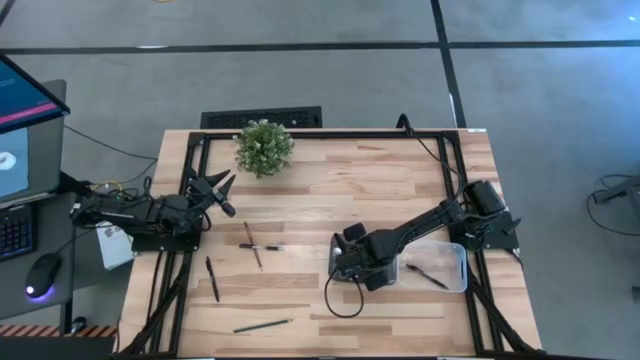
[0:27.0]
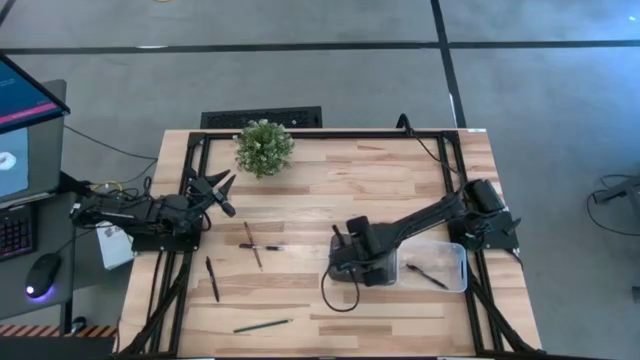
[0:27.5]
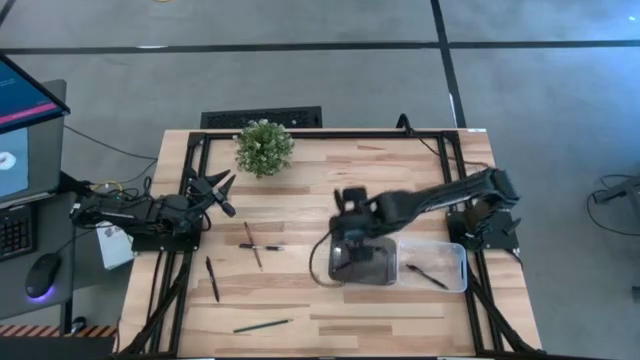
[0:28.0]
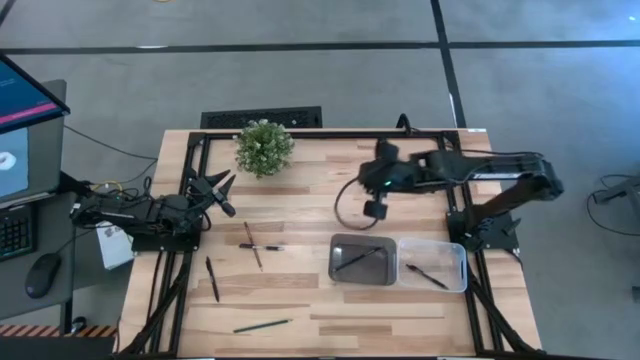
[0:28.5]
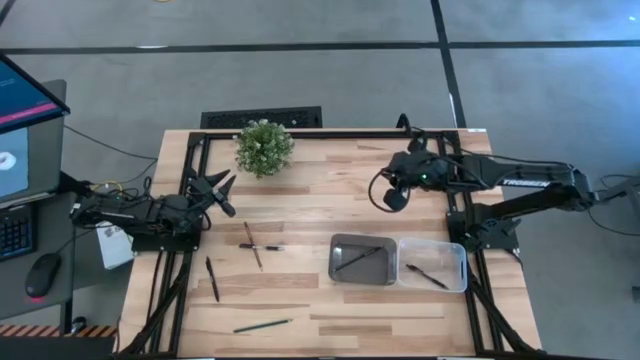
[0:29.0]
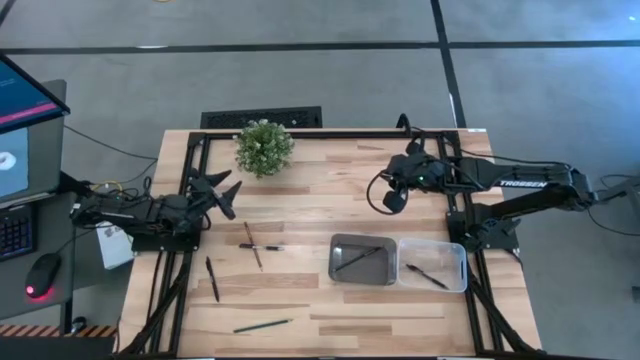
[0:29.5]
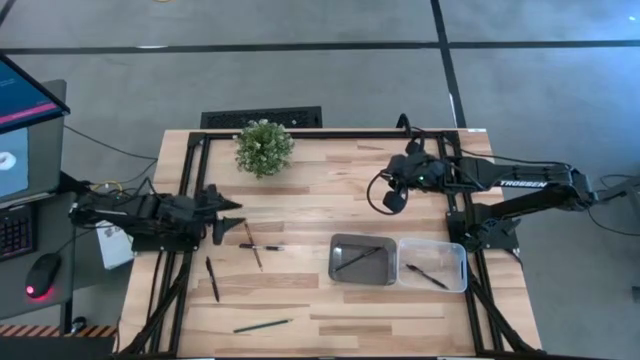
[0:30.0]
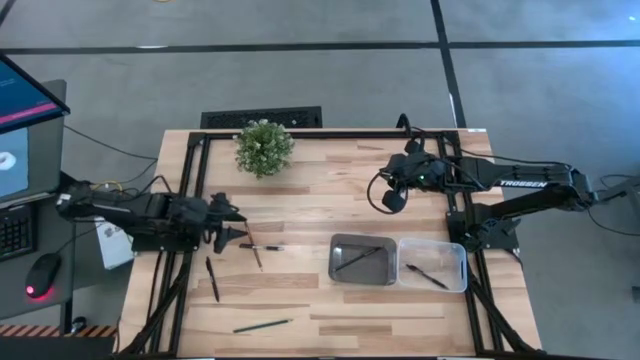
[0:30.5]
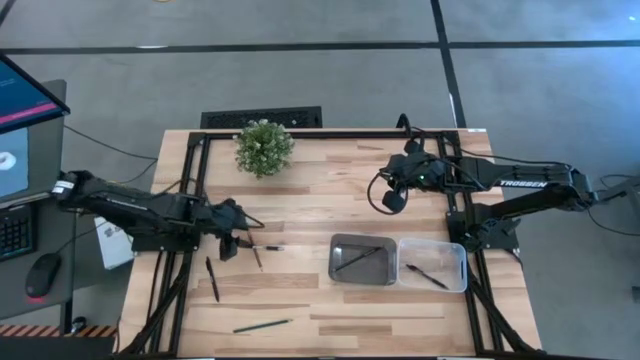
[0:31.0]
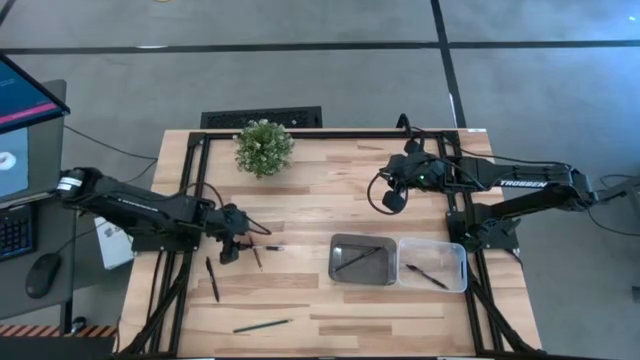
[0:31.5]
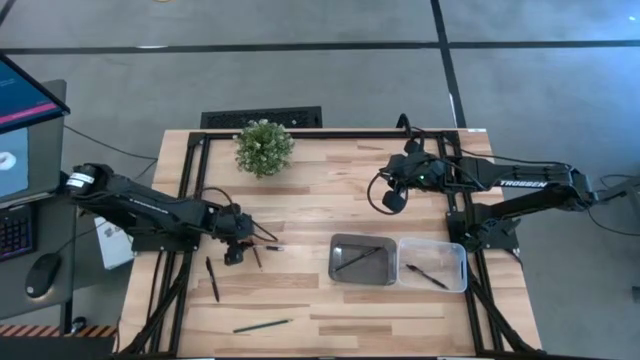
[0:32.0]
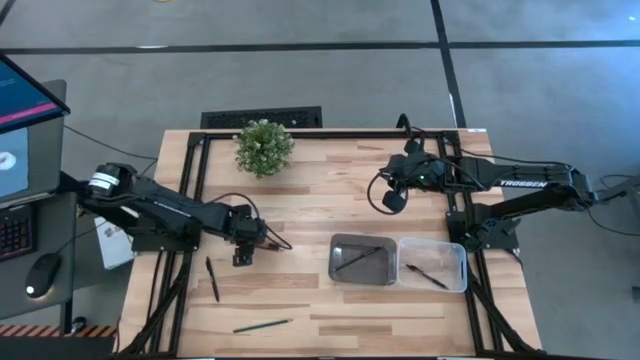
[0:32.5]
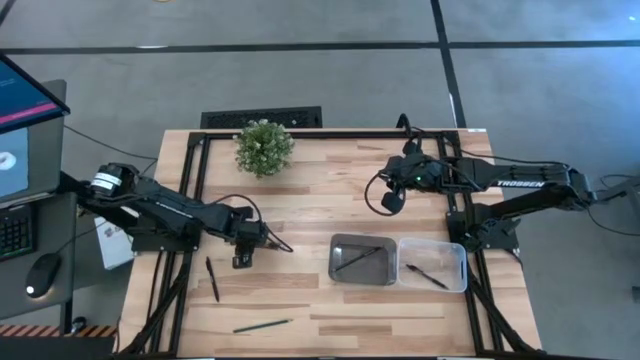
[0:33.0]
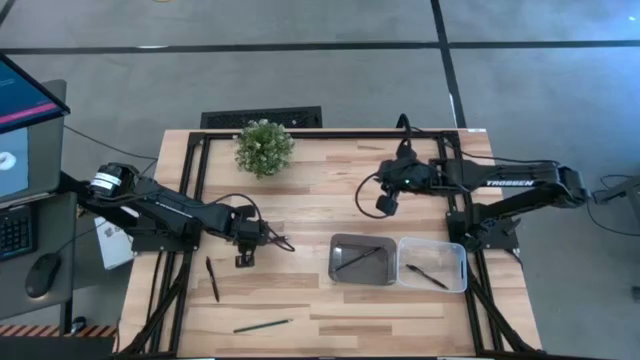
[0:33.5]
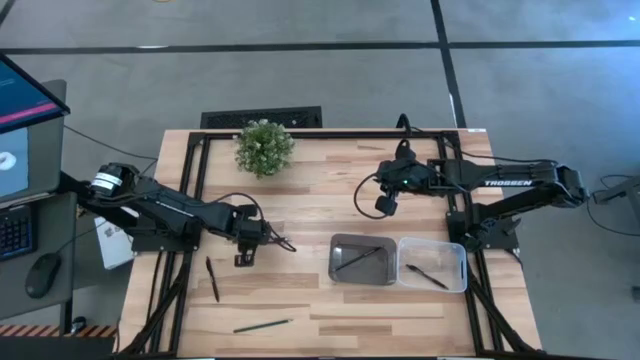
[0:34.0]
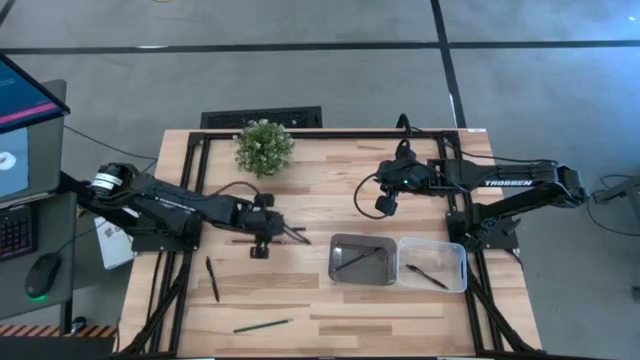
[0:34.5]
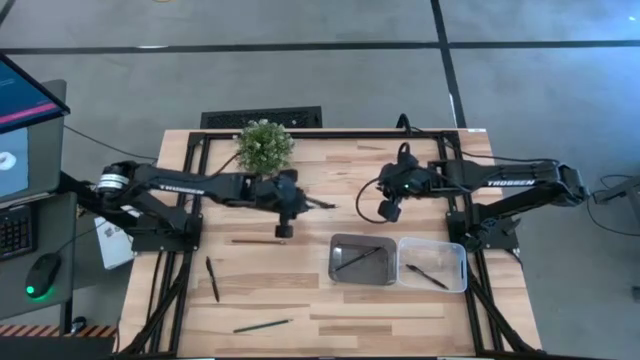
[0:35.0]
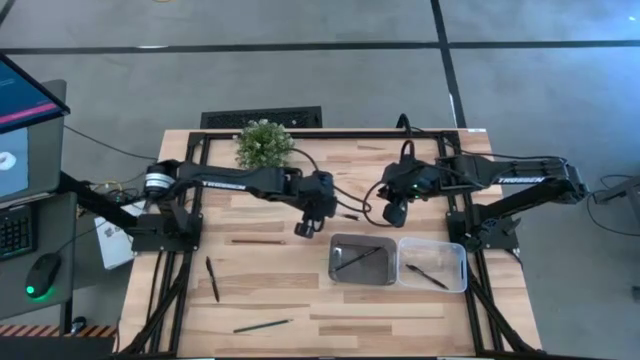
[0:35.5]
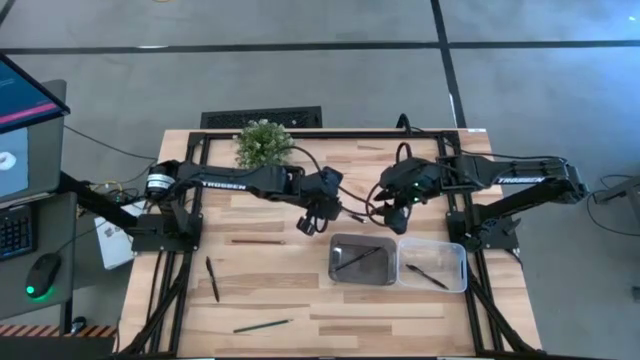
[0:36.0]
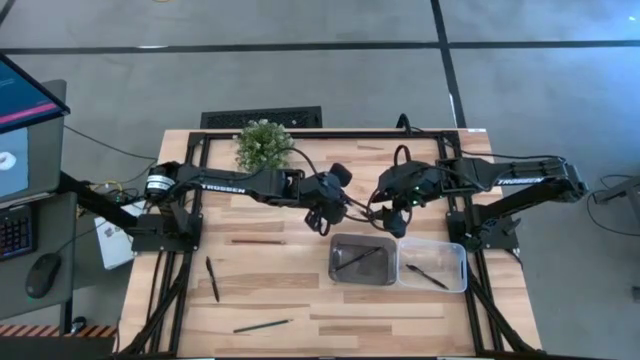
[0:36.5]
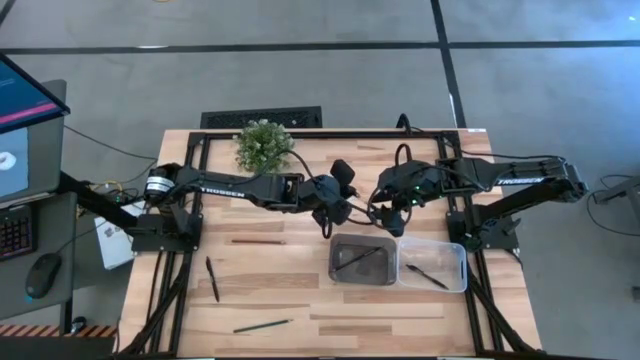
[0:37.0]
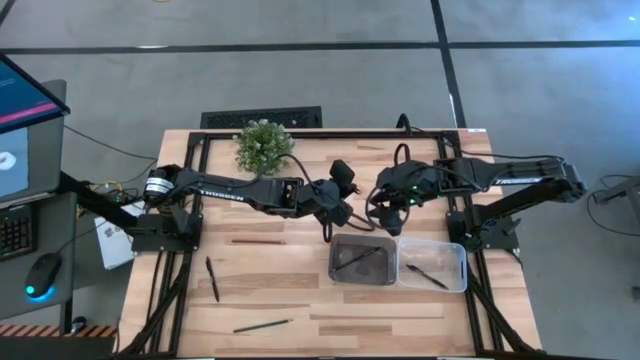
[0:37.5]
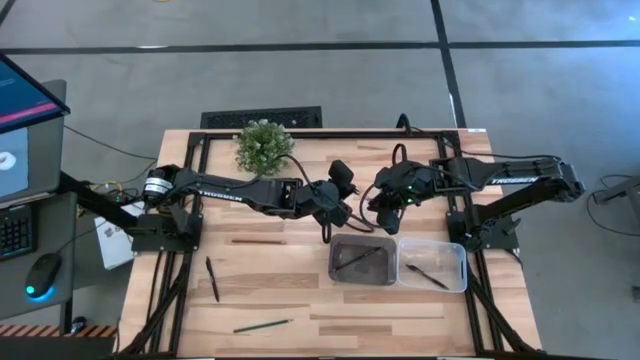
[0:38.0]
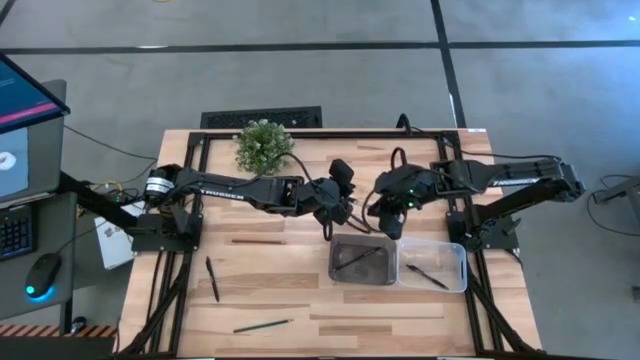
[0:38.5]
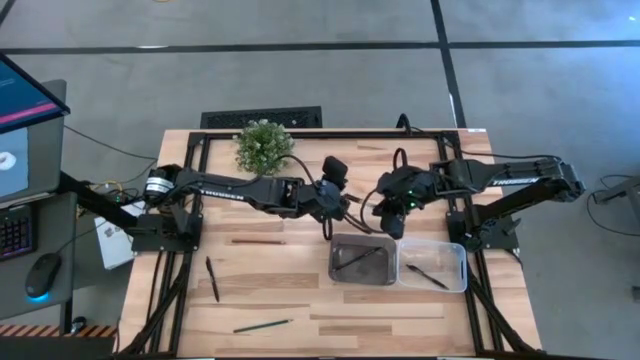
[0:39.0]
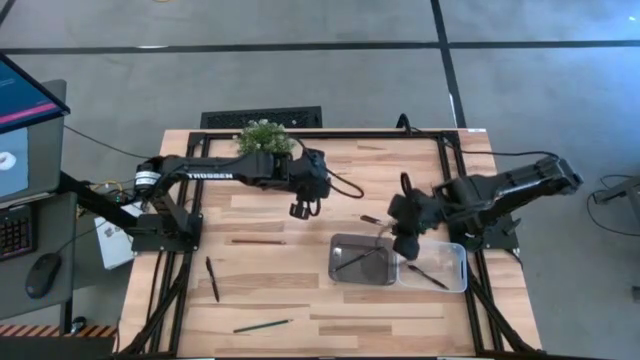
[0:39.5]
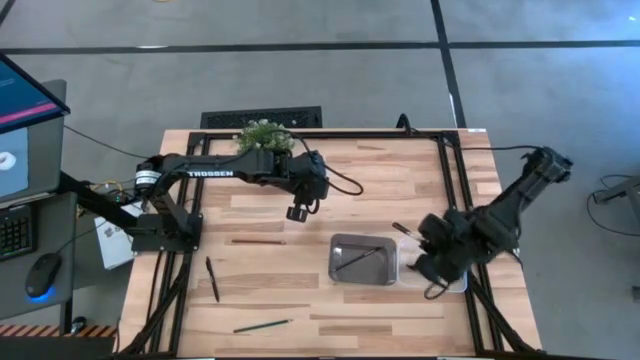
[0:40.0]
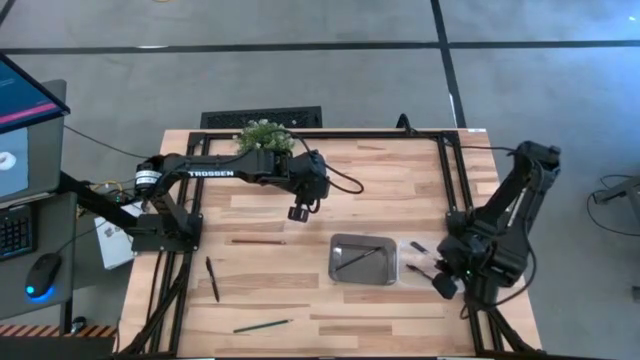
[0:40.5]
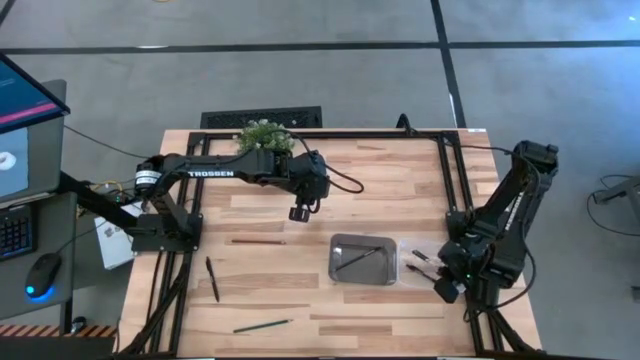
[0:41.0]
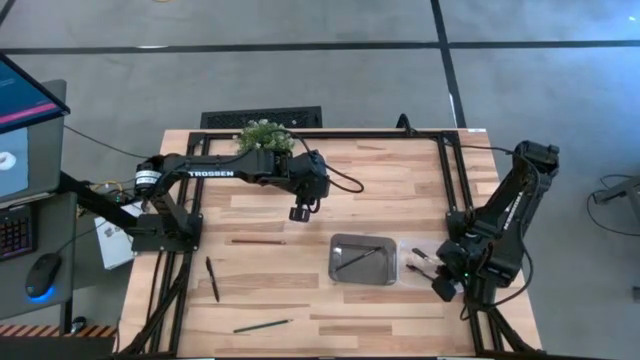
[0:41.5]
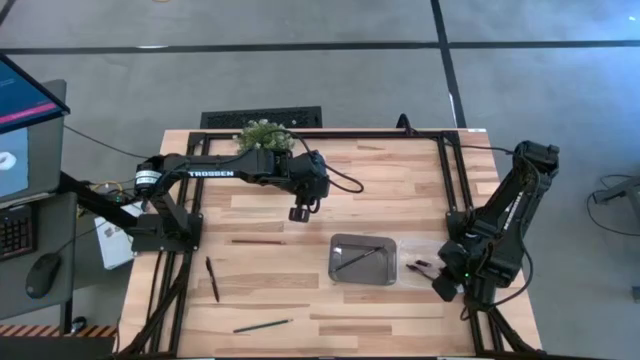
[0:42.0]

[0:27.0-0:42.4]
Task: Sort pens & pencils
Put the top black pen into the transparent bin

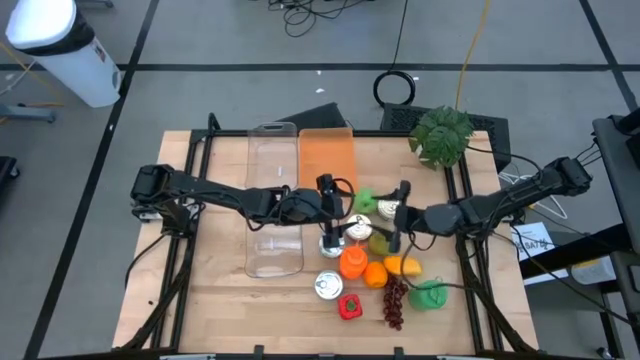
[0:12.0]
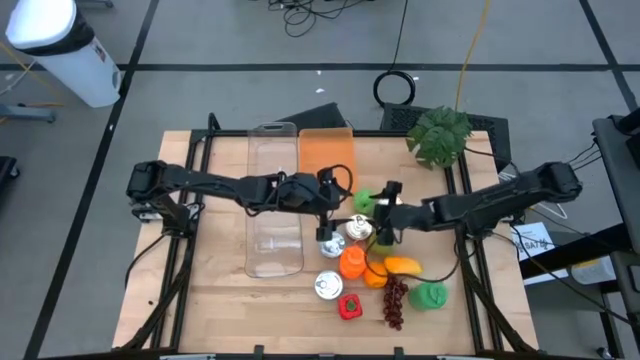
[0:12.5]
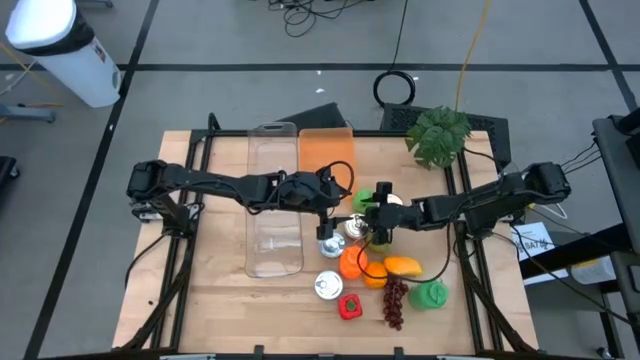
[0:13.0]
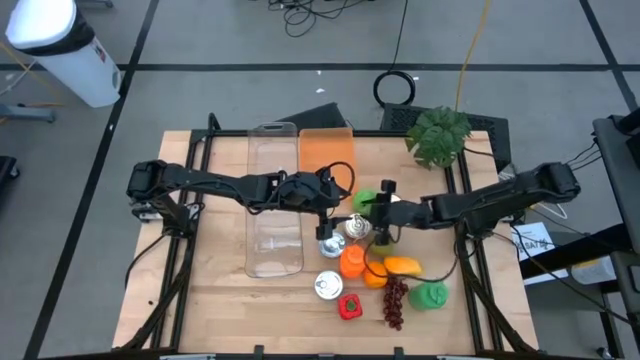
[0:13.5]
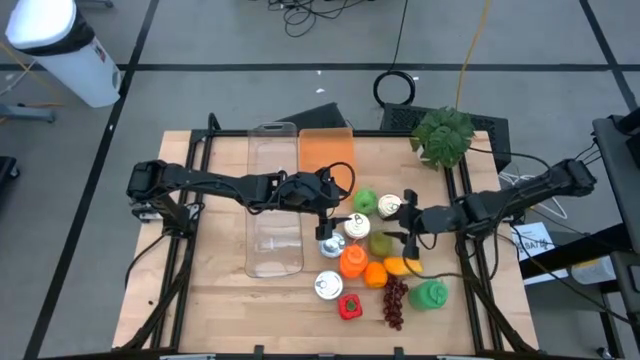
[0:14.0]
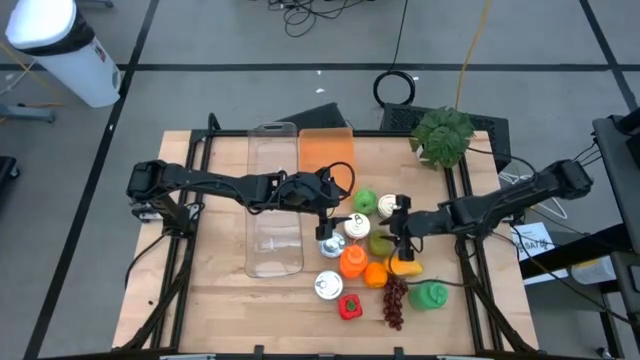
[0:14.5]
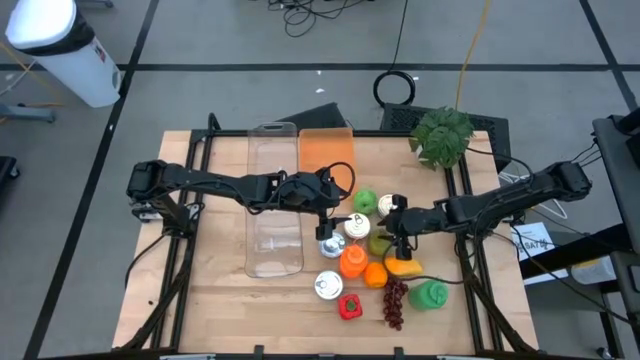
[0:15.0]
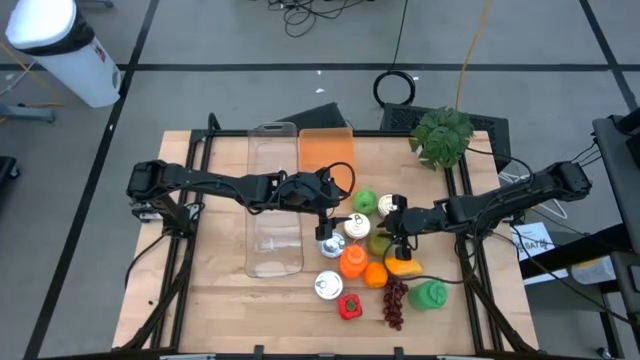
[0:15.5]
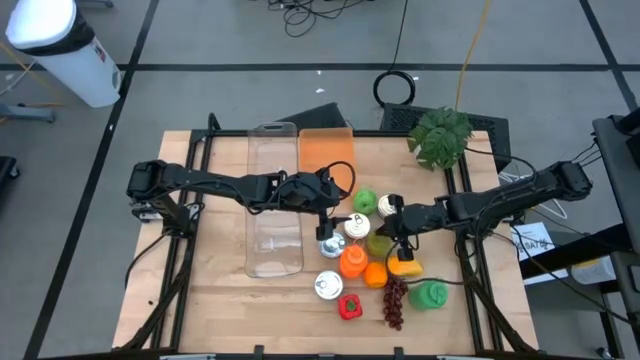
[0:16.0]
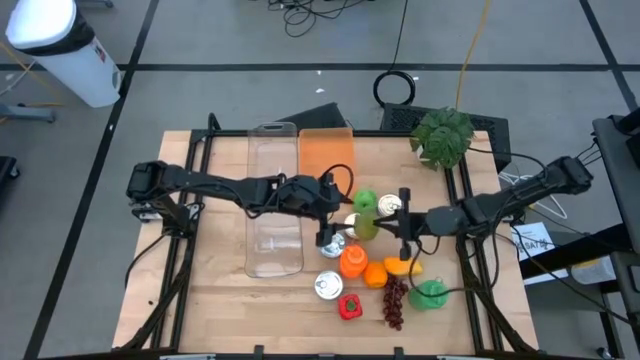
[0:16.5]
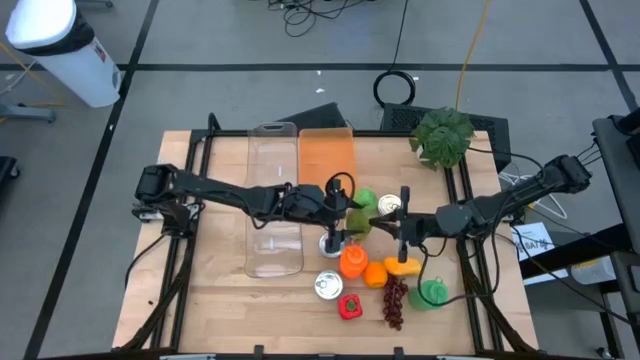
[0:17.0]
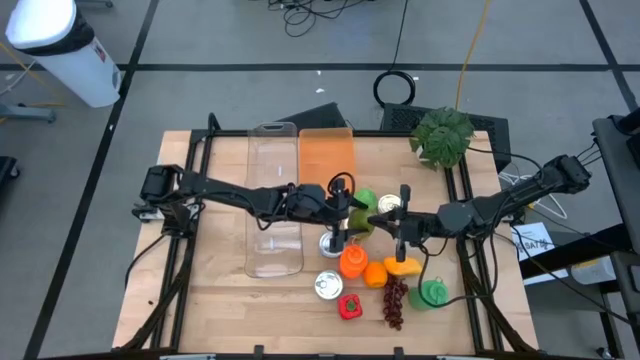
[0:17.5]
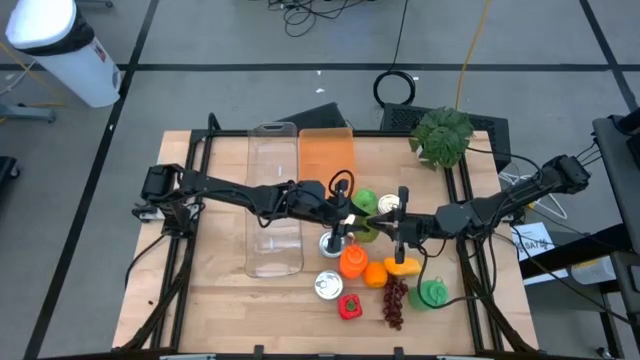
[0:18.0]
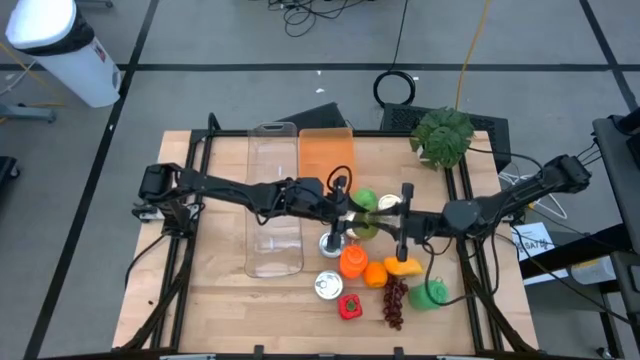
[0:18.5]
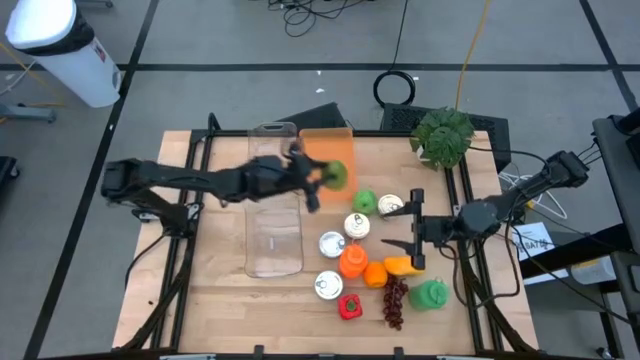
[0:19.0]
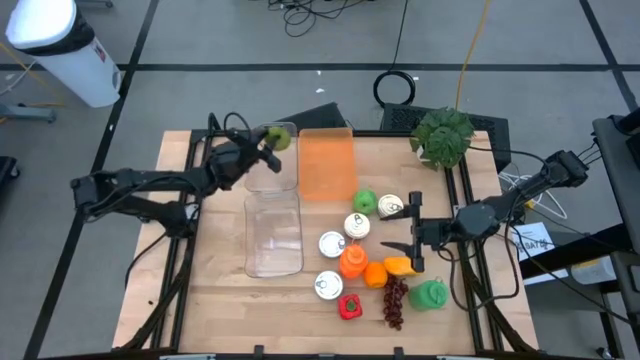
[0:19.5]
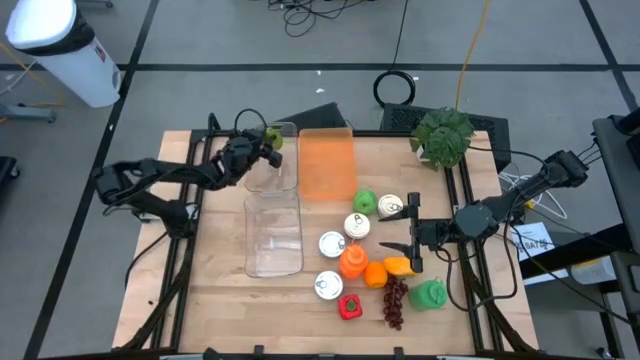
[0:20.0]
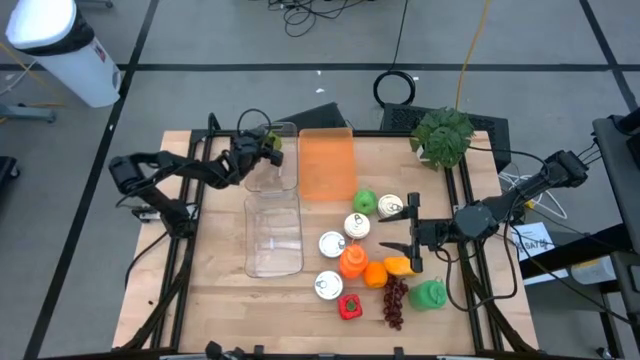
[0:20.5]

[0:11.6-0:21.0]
Task: Pick & Place Food Item
Put the green pear into the top transparent bin
